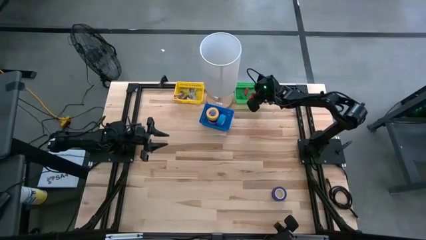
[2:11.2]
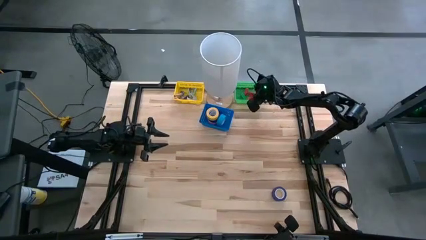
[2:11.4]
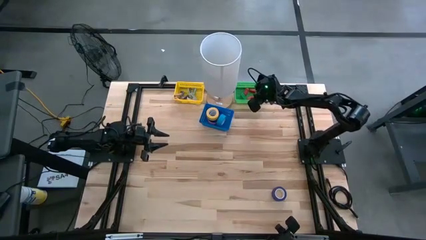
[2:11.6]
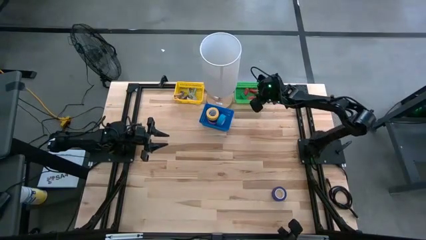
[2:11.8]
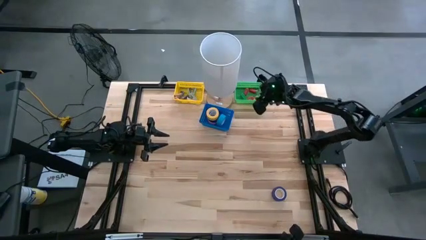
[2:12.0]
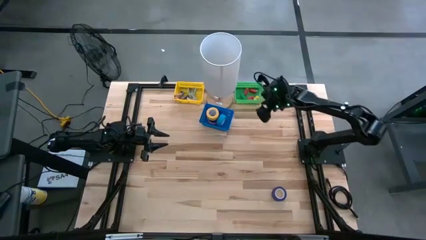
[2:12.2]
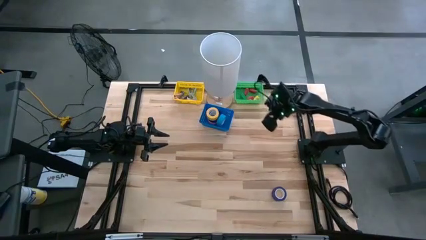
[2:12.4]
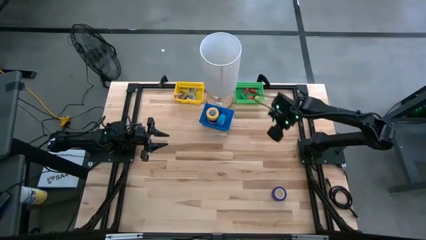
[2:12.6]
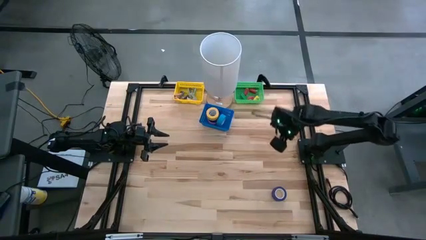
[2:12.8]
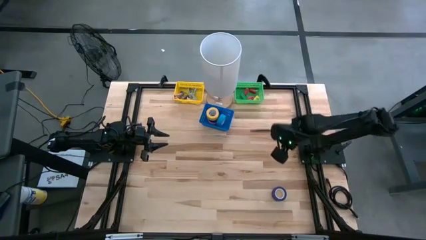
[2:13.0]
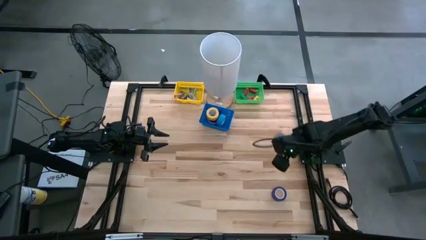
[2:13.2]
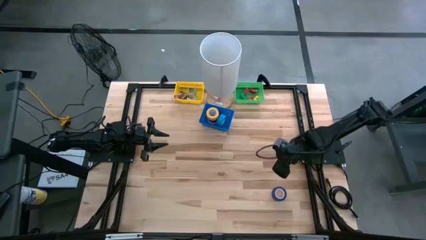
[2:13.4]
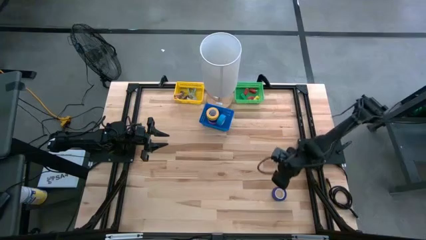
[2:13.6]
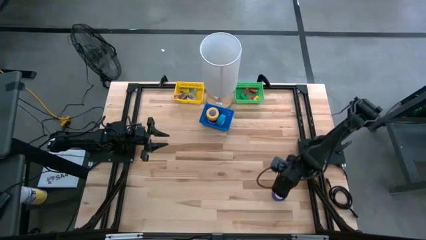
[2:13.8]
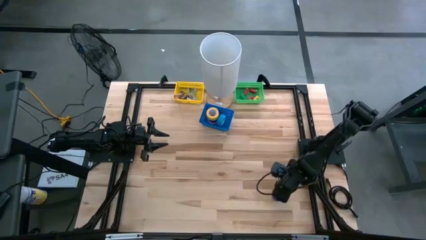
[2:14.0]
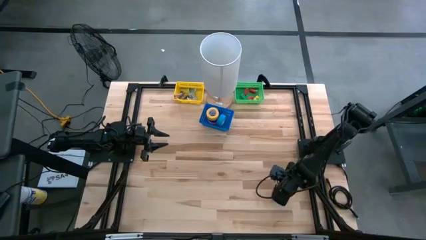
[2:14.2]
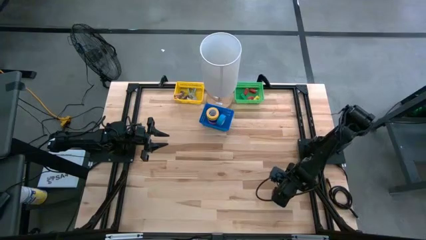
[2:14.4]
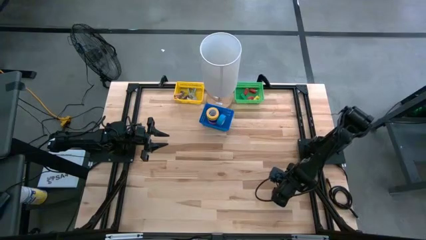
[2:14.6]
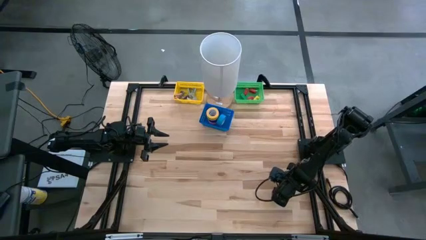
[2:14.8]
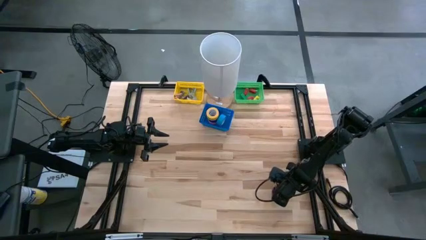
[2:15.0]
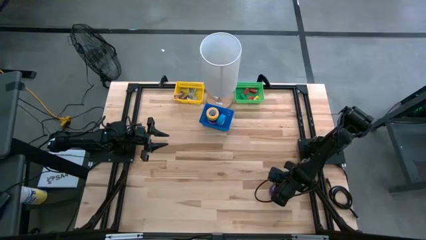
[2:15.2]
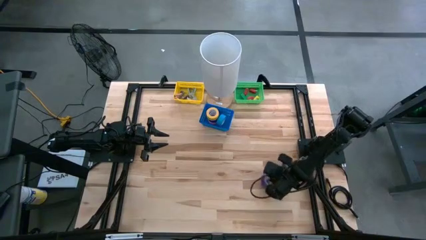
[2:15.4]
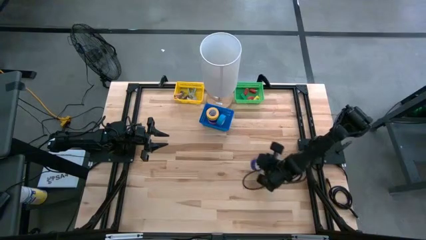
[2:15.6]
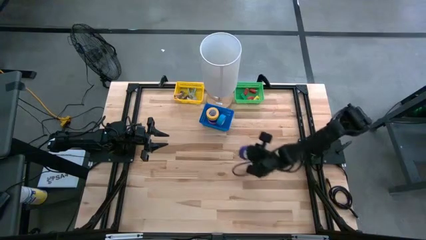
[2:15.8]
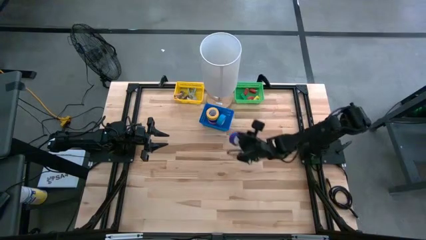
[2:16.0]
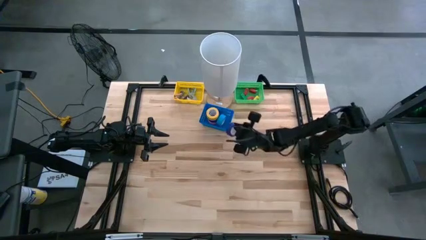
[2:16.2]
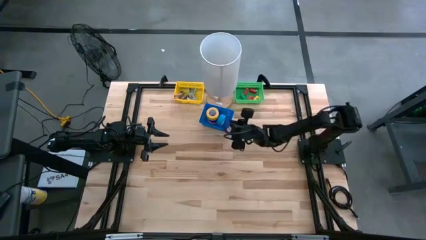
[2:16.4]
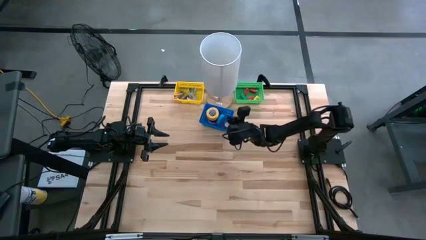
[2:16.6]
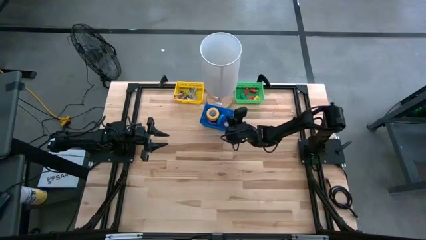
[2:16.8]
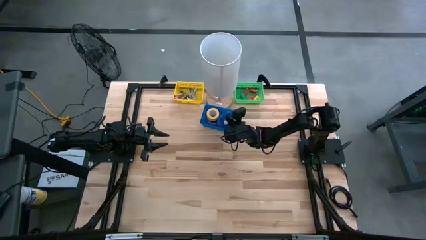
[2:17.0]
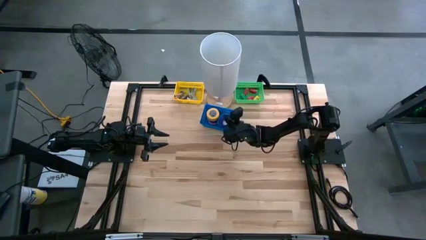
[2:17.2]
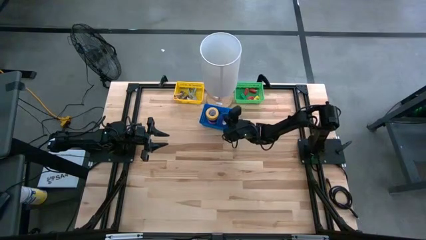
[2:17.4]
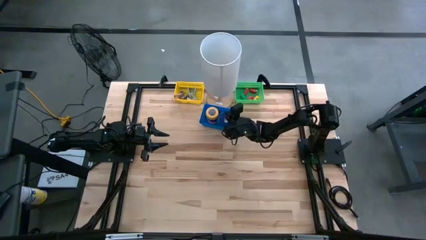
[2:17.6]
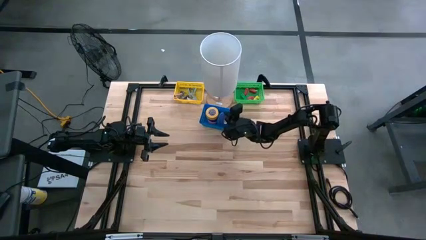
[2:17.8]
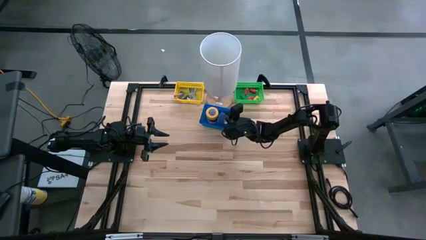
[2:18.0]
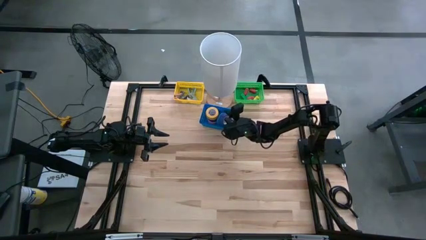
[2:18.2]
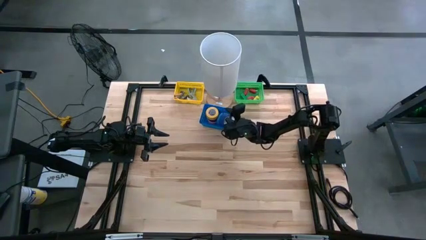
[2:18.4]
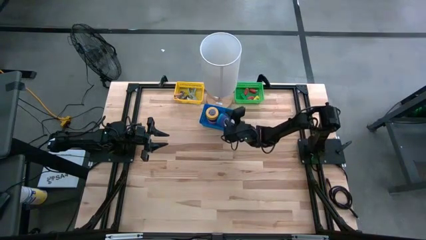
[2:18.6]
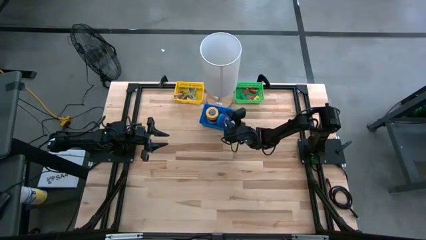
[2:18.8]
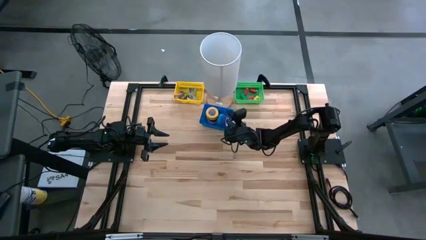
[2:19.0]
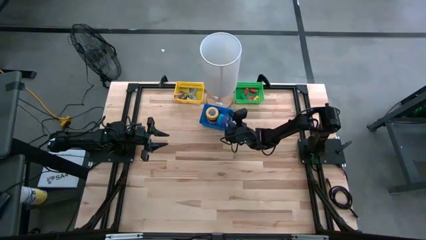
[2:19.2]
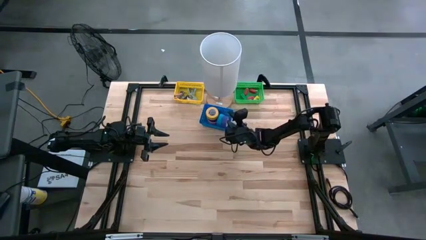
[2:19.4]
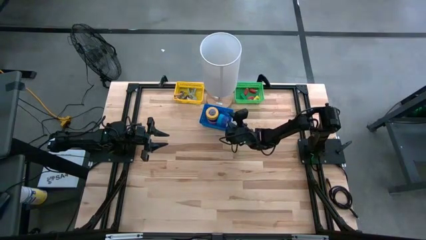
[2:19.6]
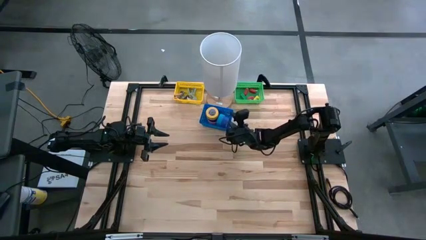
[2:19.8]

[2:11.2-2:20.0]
Task: Pick and place Stapler, Stapler remover, tape
Put the violet tape into the blue basket

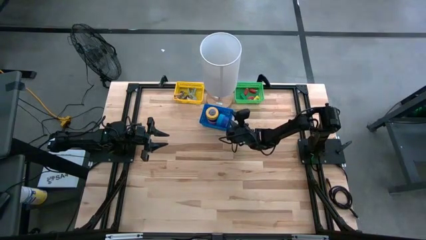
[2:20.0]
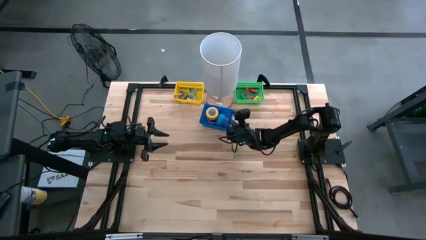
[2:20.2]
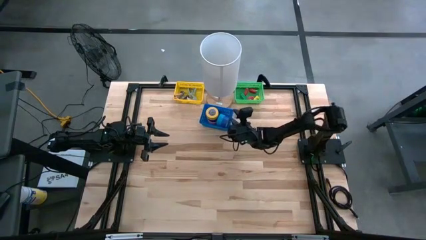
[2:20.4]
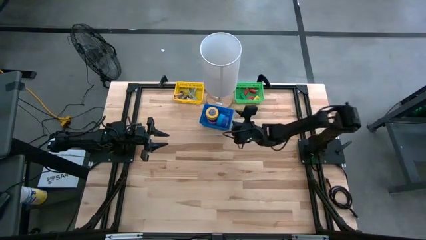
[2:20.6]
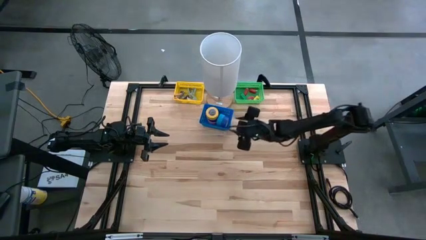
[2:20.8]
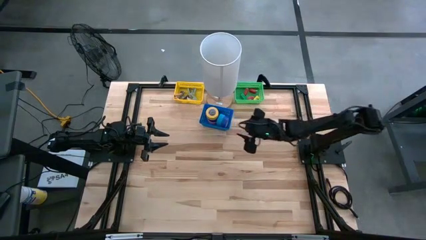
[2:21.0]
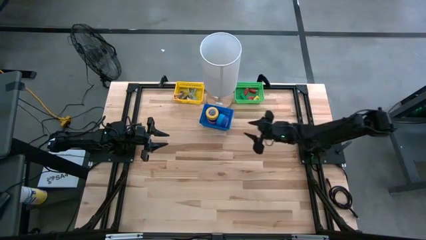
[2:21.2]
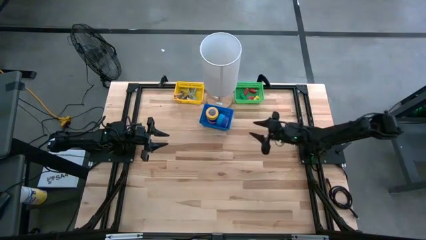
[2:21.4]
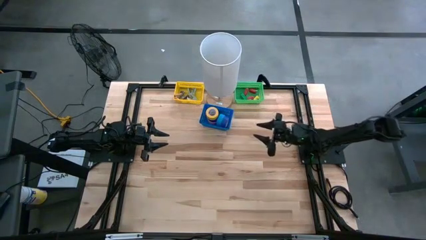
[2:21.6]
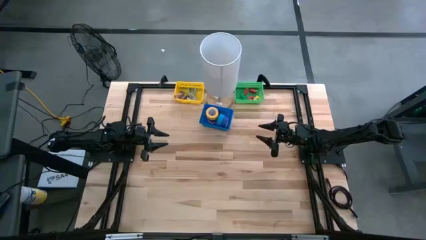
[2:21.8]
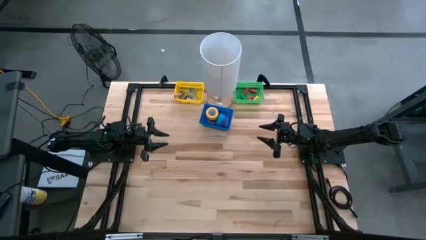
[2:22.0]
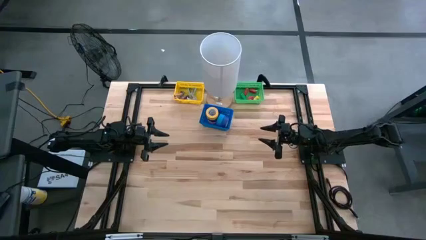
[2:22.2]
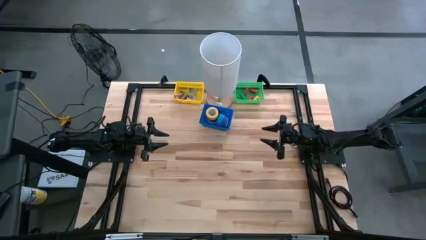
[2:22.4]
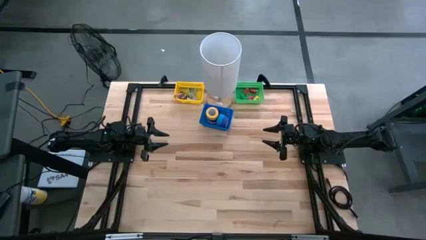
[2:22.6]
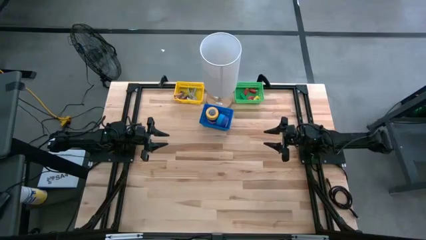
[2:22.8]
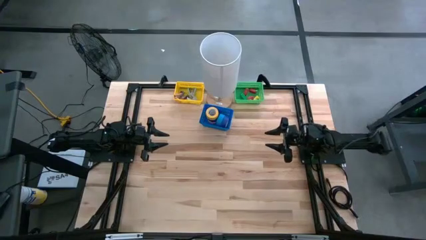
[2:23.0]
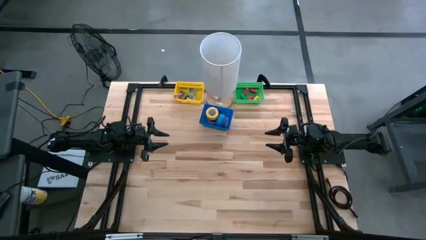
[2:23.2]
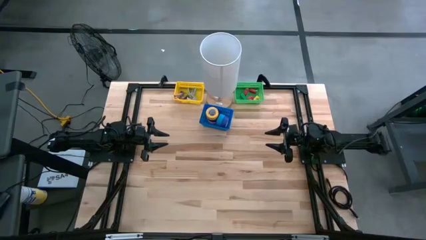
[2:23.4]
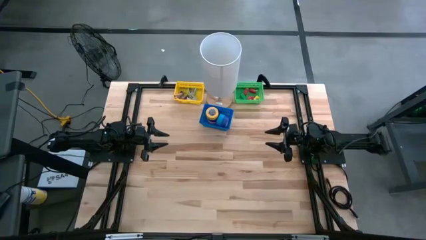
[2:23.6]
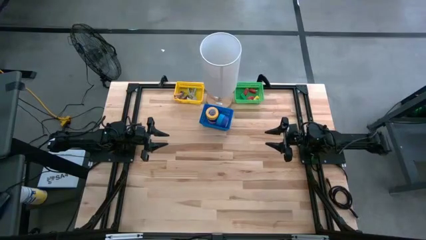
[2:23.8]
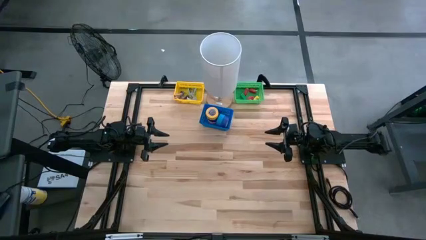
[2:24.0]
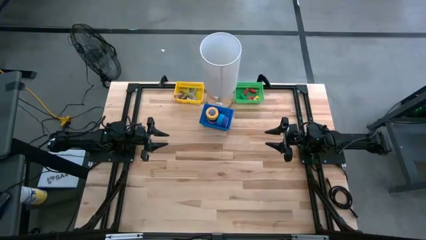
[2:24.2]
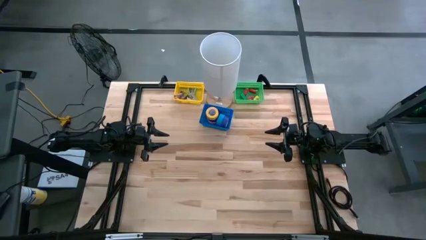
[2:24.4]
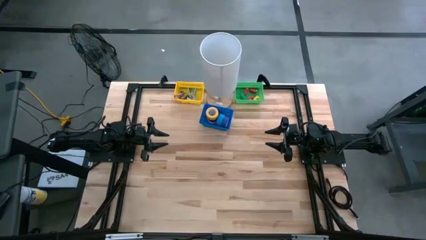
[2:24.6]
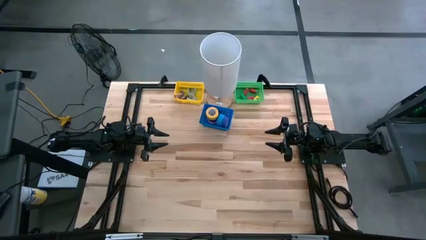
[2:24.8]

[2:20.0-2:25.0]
Return to Home Position

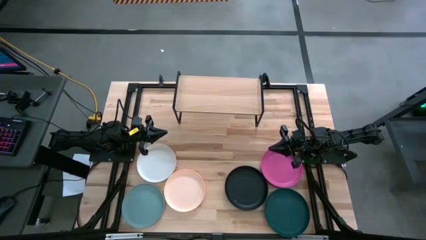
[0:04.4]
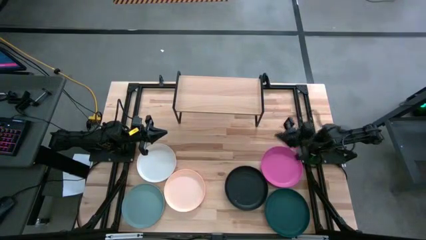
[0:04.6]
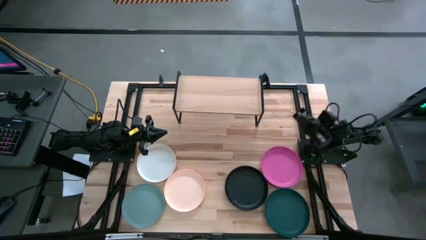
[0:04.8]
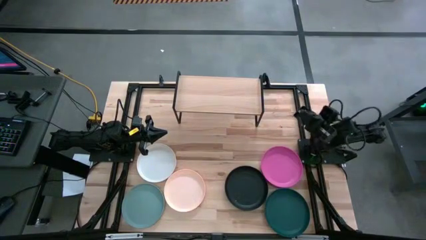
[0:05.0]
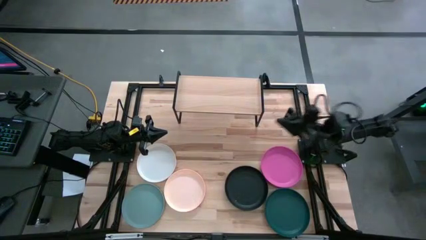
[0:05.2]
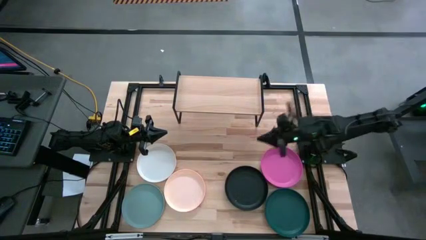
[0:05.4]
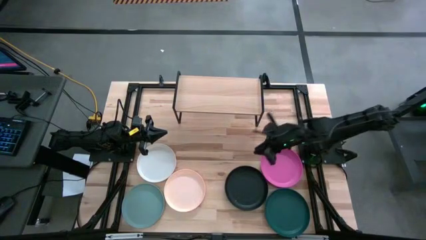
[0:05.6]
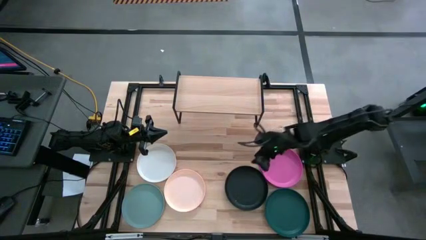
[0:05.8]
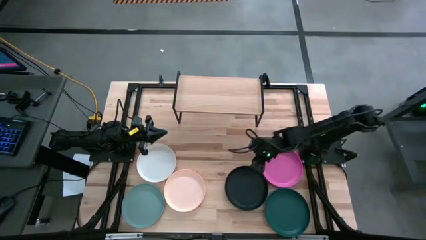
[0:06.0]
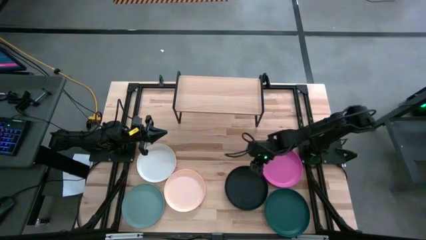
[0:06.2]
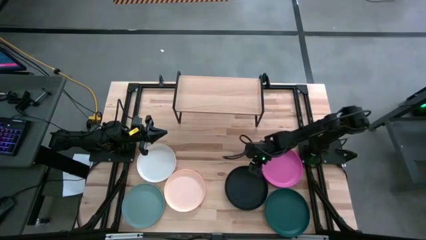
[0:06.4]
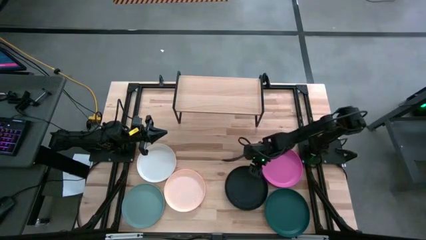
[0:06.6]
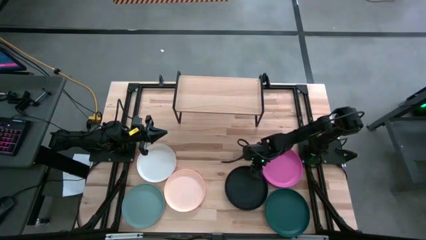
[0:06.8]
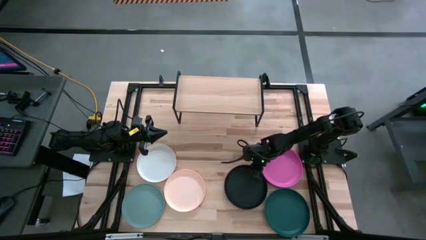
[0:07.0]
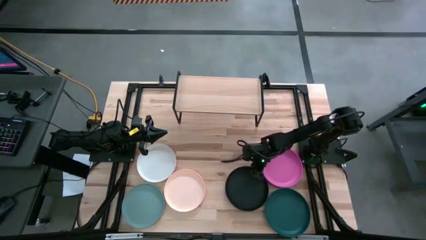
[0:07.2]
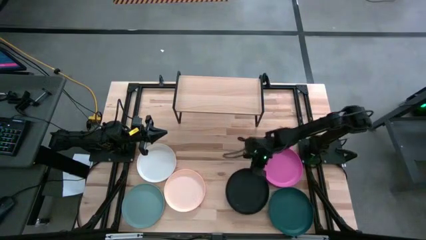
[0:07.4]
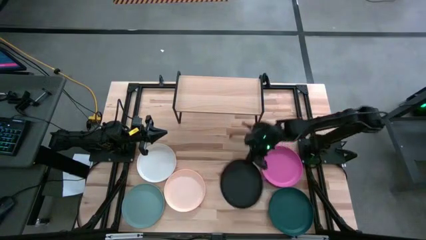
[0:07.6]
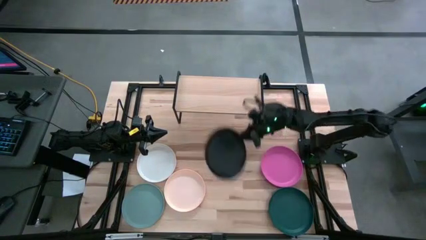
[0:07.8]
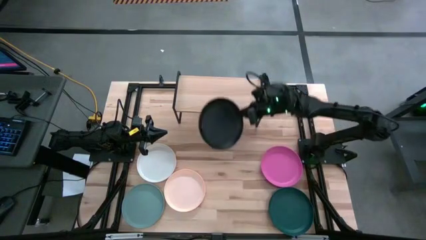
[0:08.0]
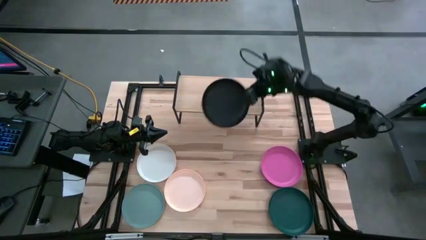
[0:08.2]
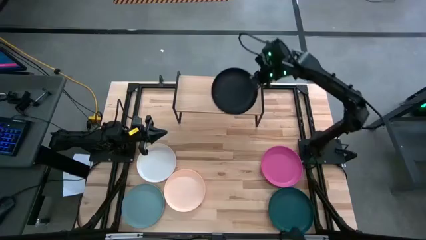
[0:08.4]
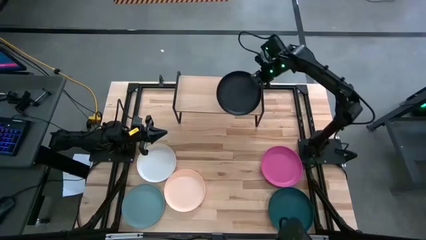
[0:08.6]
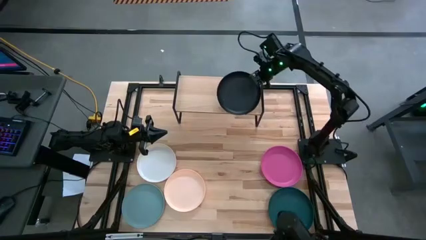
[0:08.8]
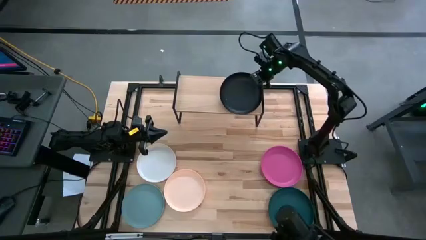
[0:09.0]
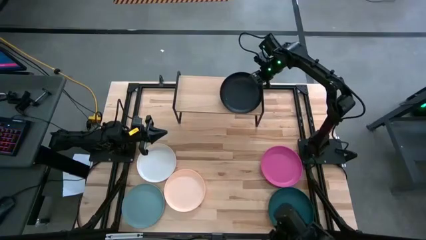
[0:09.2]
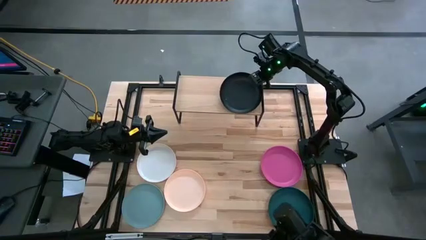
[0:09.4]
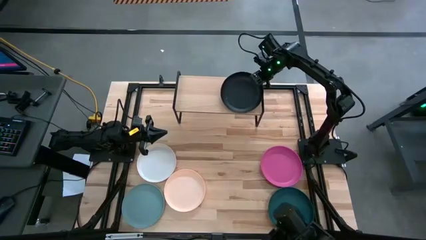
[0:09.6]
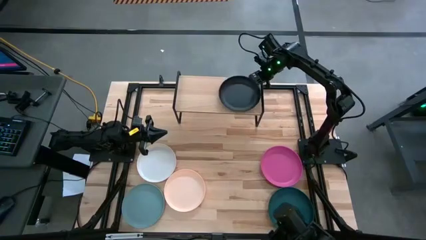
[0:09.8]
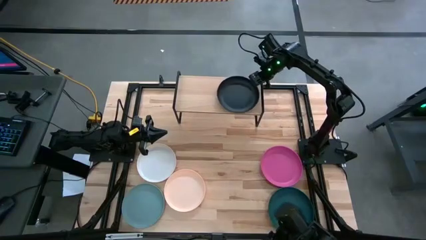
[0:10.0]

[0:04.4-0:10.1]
Task: Place and stack plates onto a shelf
Put the black plate on the shelf
